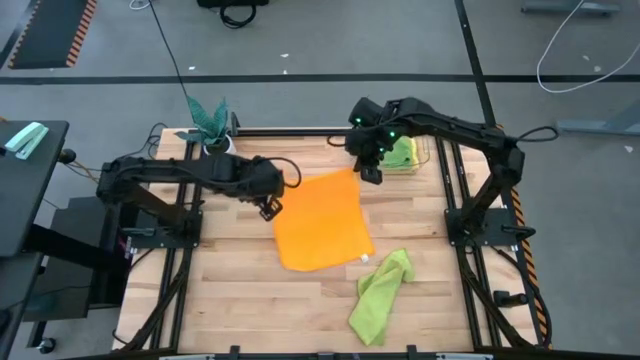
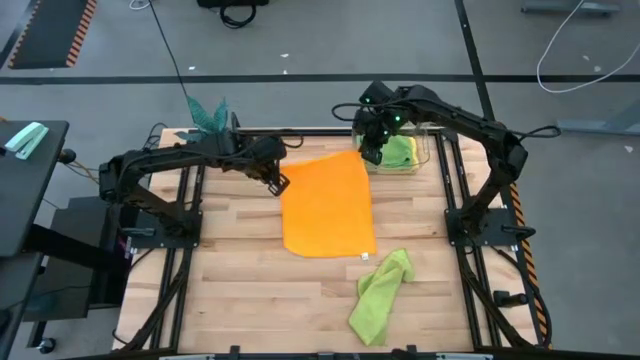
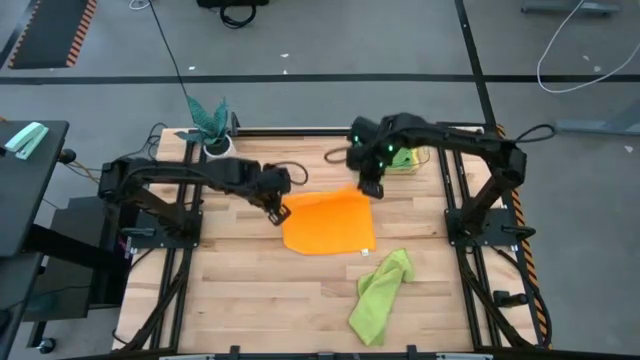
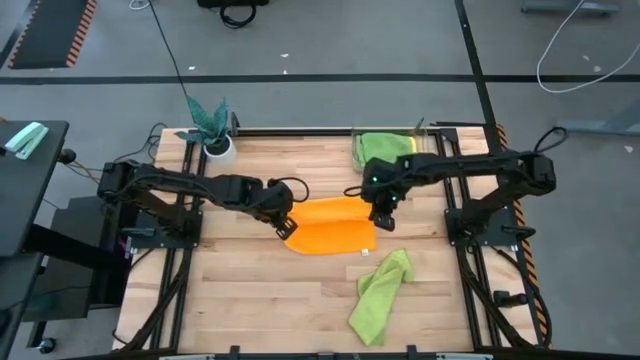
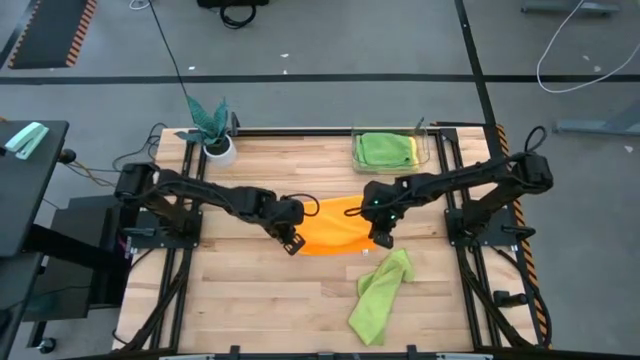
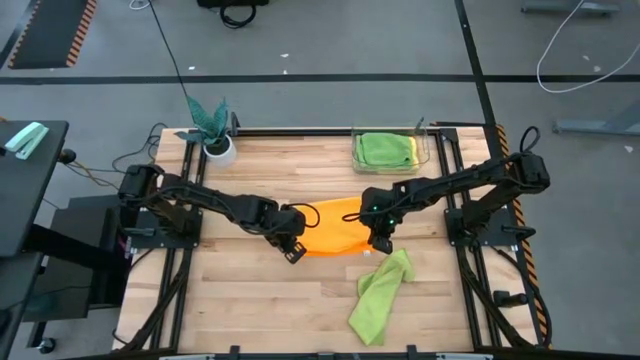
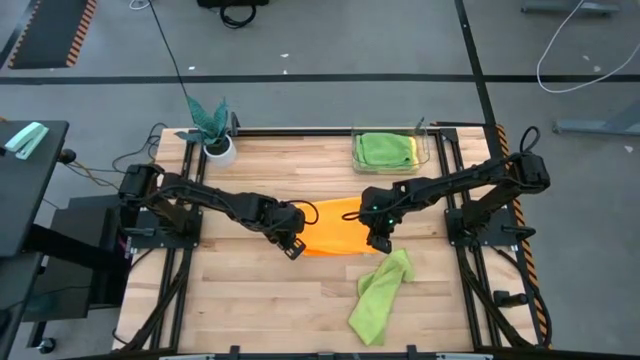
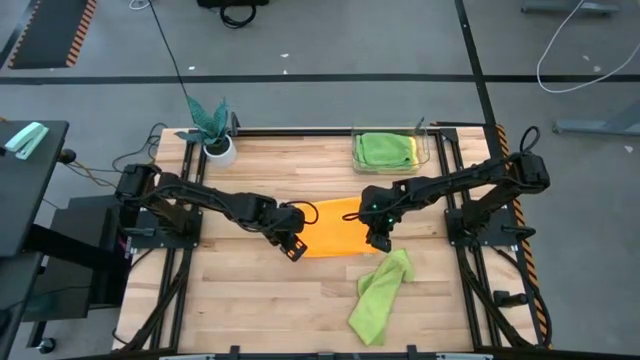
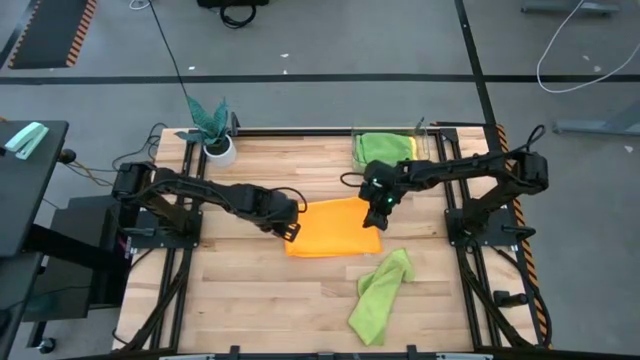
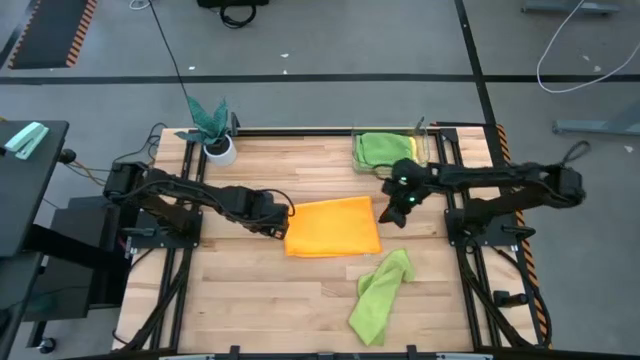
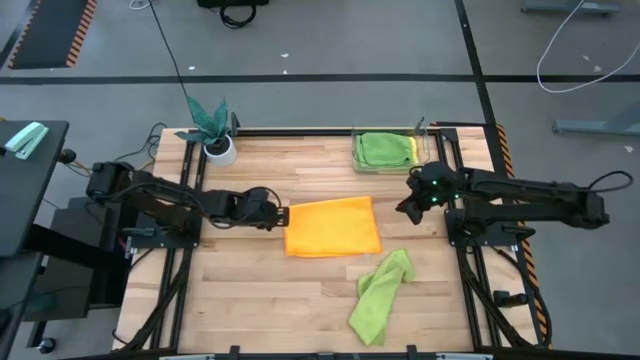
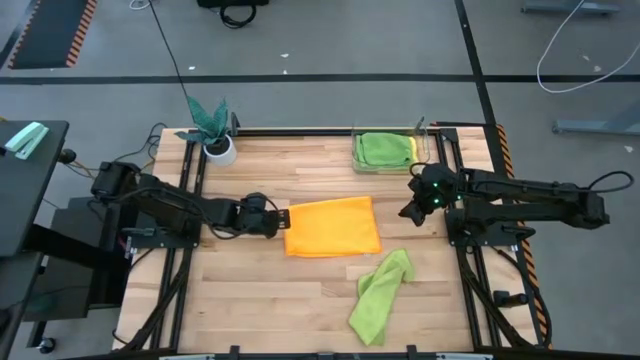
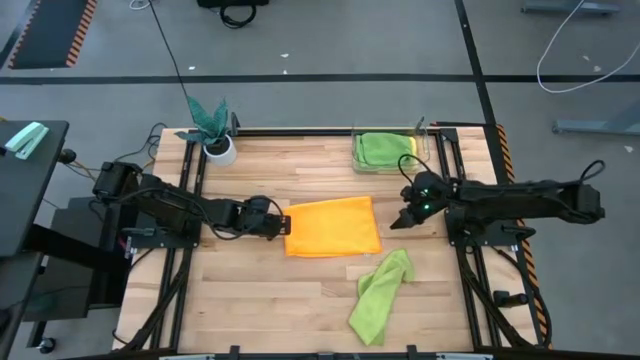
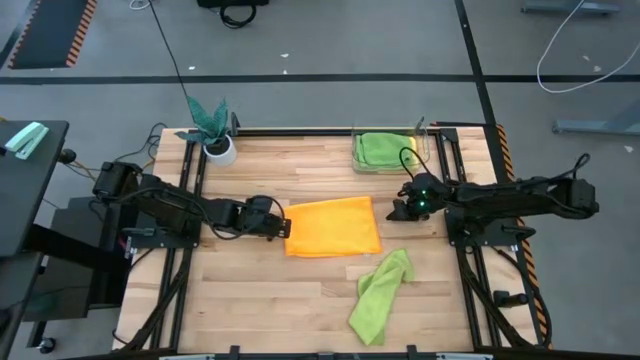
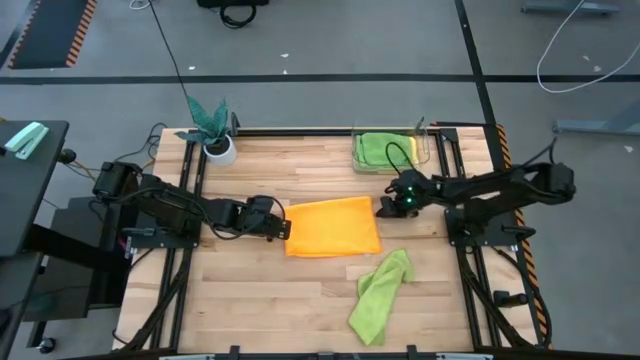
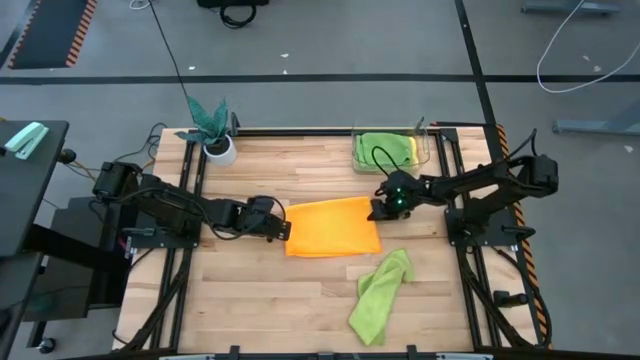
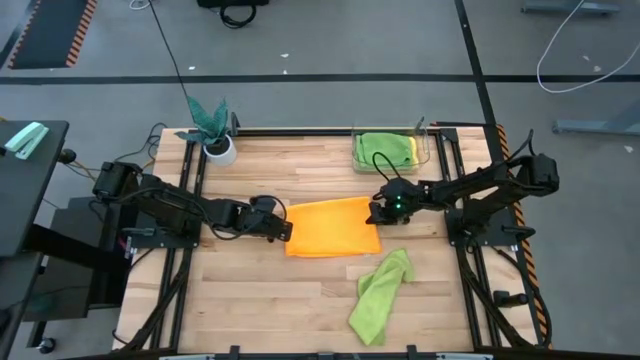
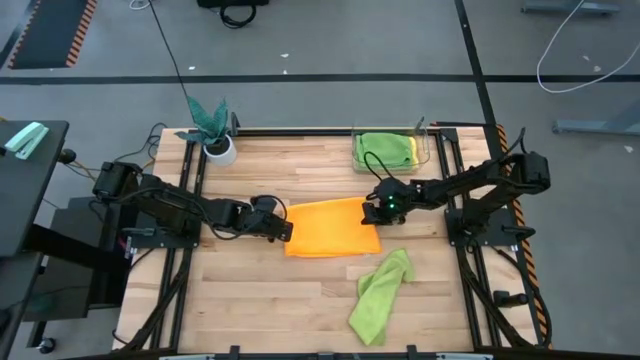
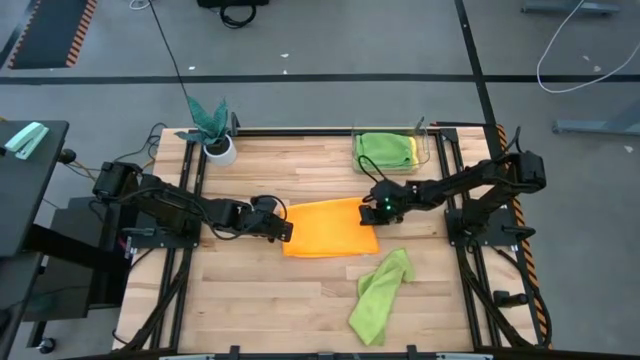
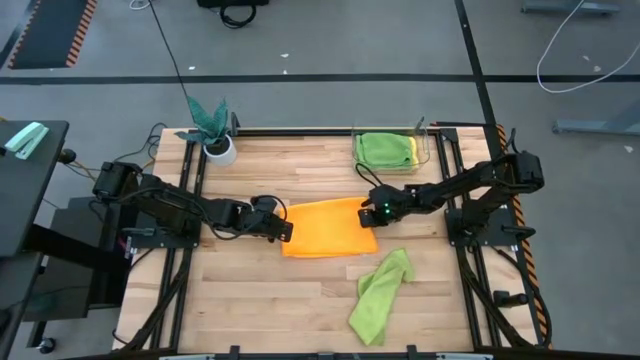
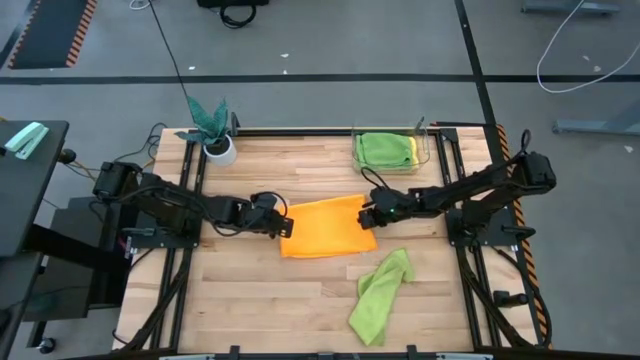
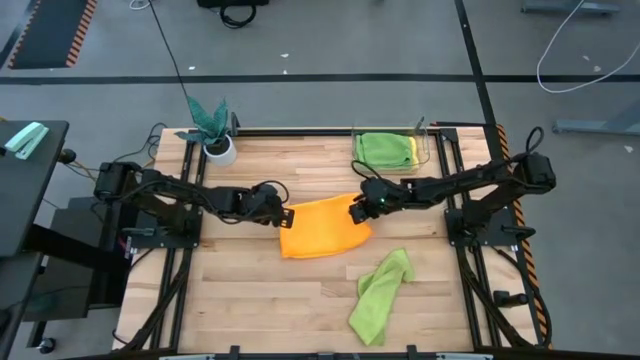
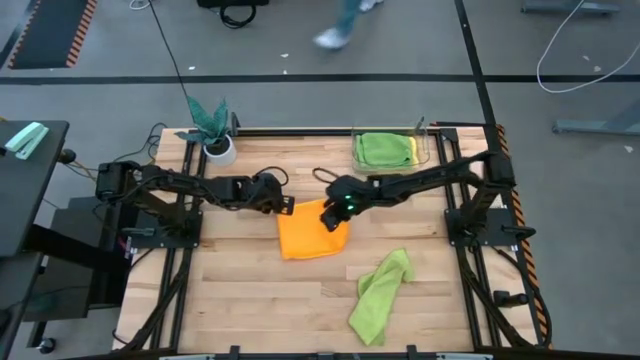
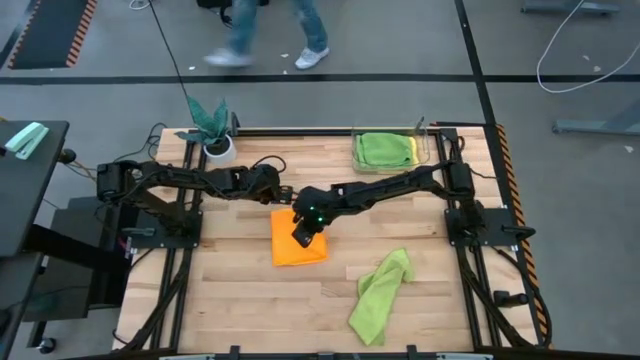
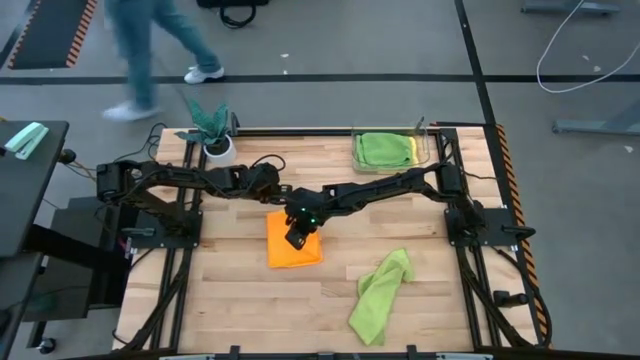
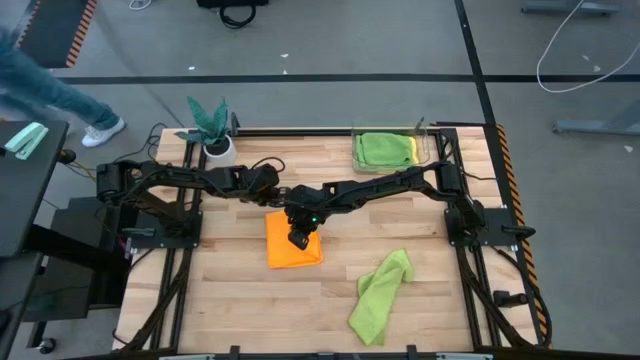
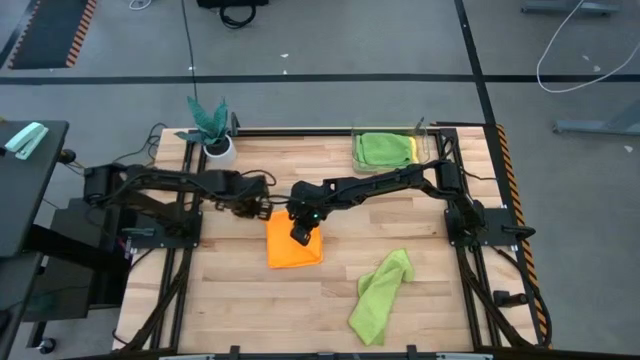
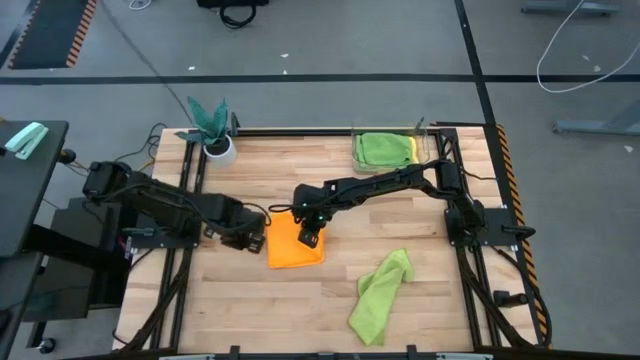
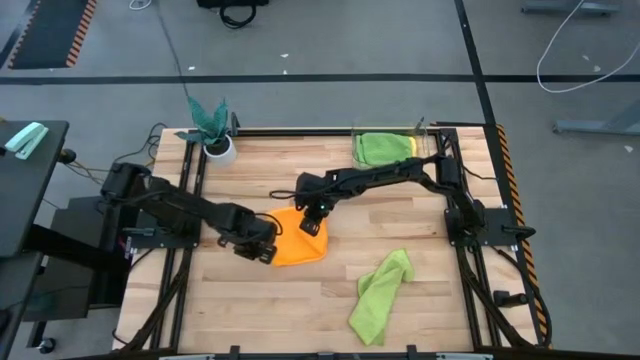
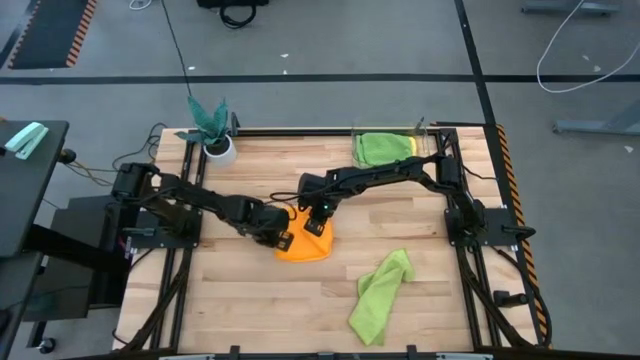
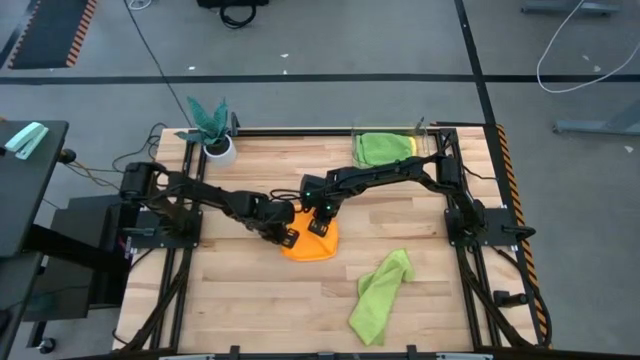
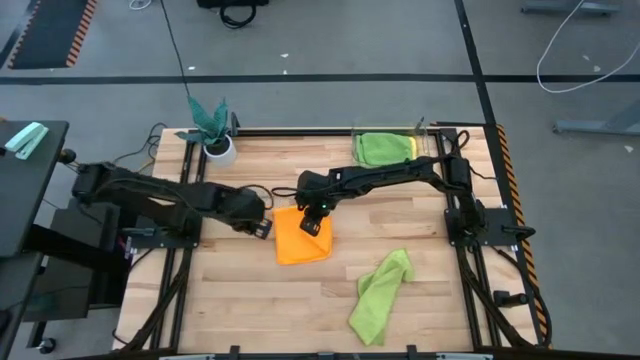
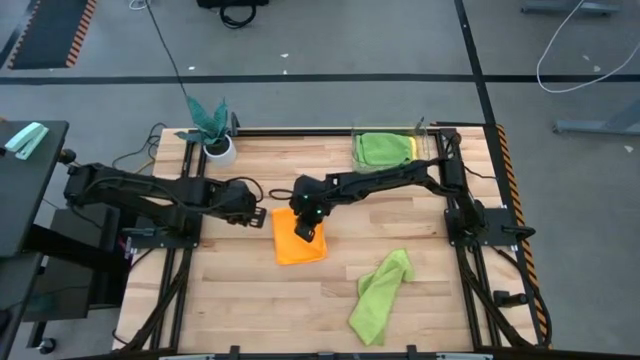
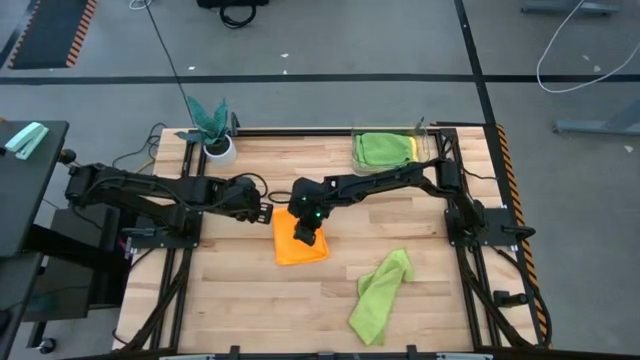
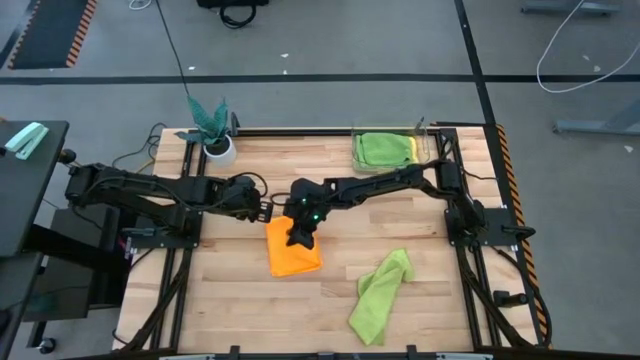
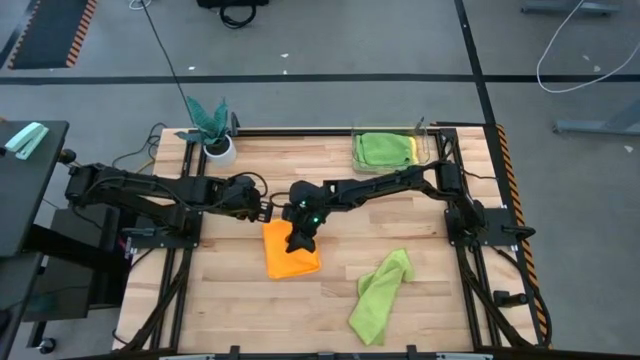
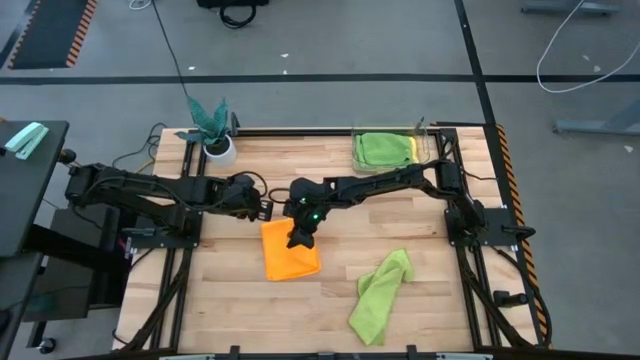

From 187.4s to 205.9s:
Task: Fold microfiber towels
Fold the orange towel

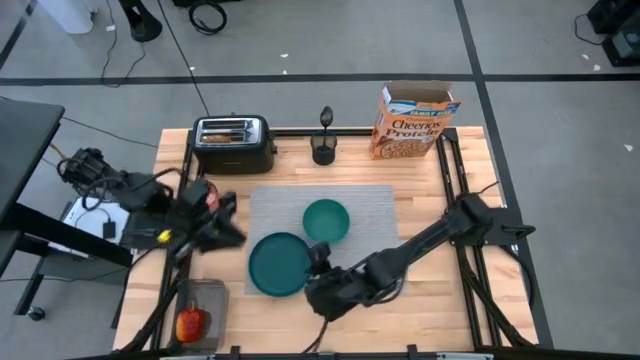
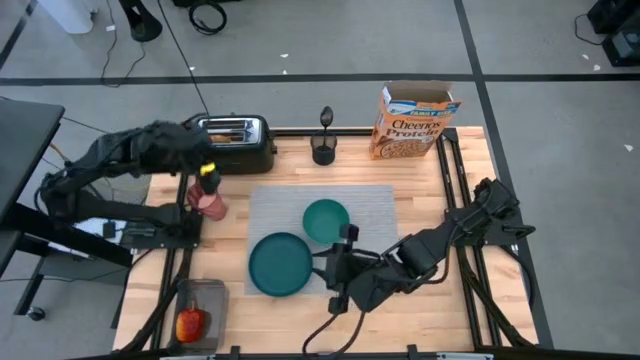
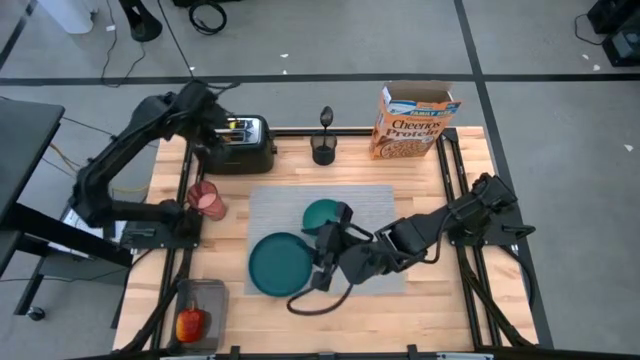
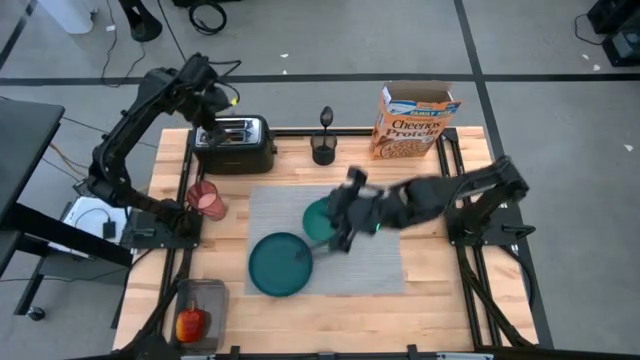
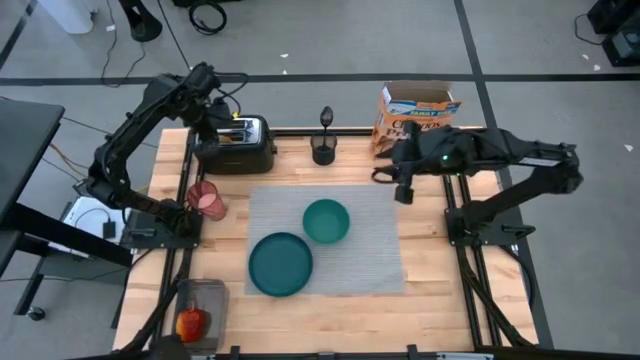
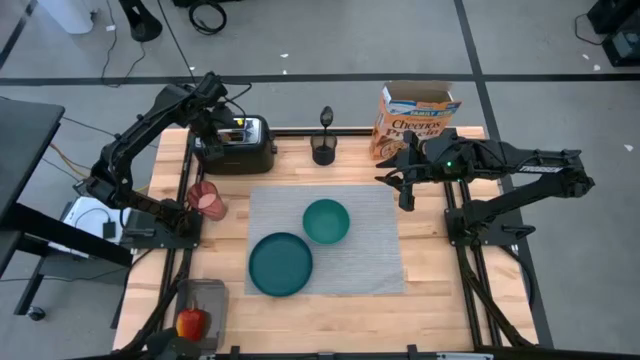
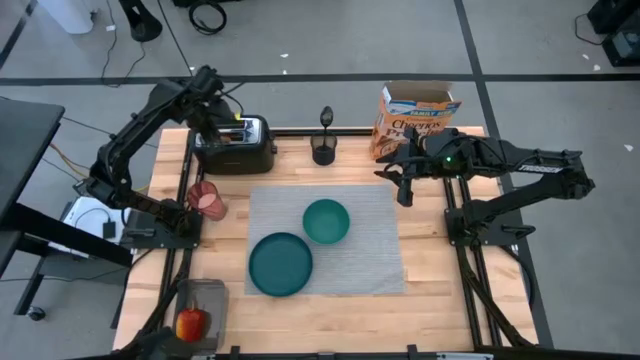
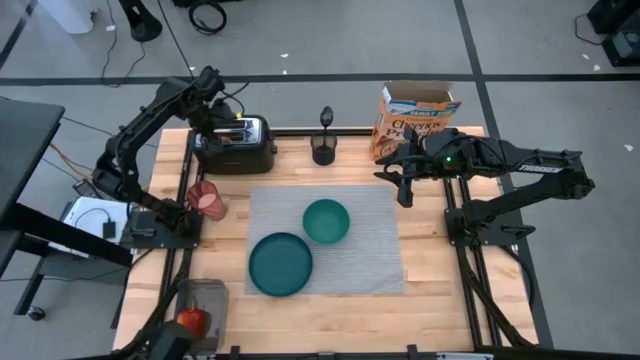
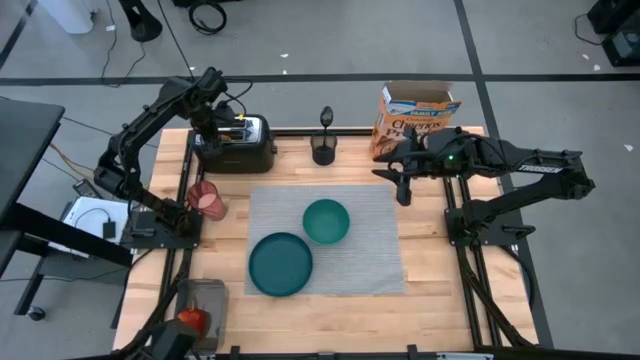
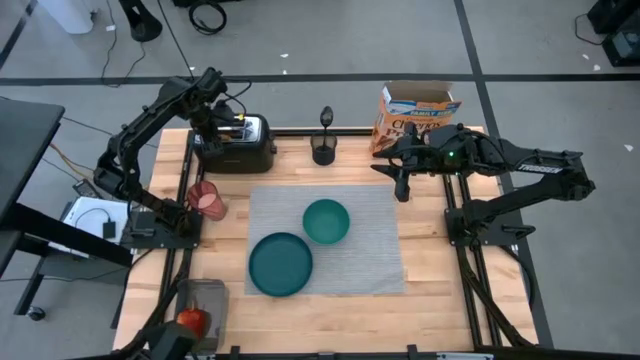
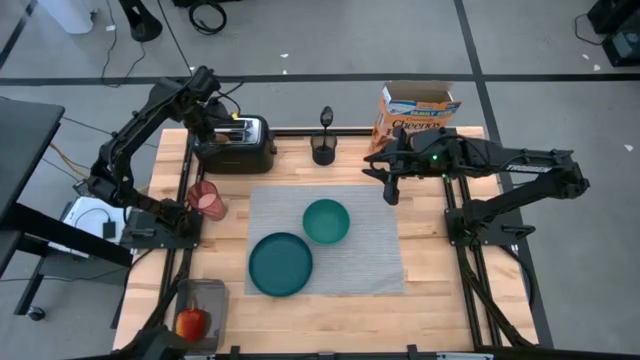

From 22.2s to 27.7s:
Task: Arrange a breakfast setting
Put the bread from the toaster on the dark green plate
